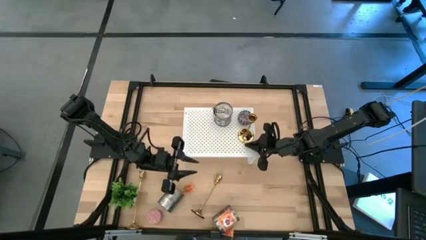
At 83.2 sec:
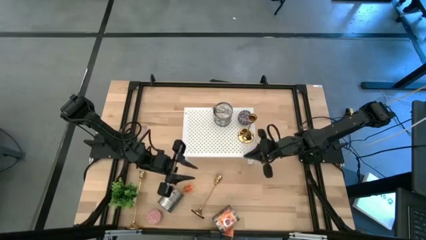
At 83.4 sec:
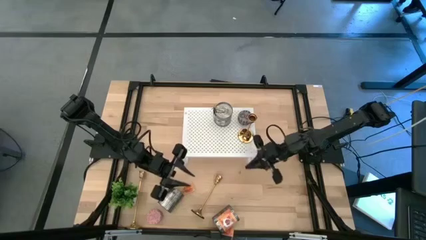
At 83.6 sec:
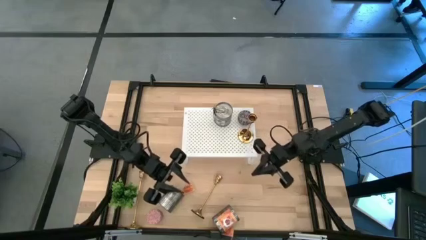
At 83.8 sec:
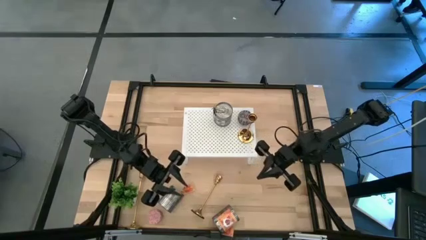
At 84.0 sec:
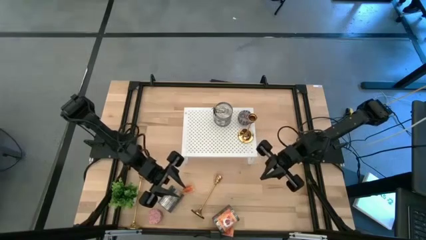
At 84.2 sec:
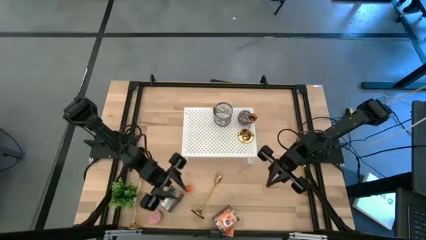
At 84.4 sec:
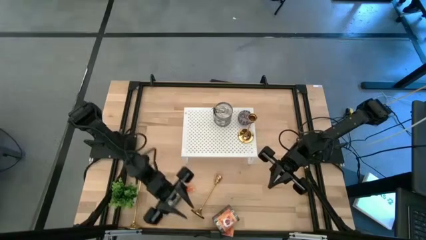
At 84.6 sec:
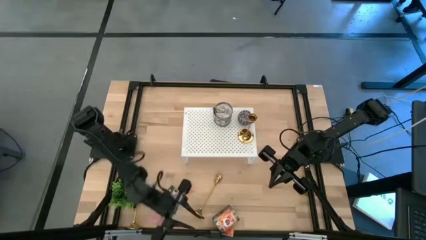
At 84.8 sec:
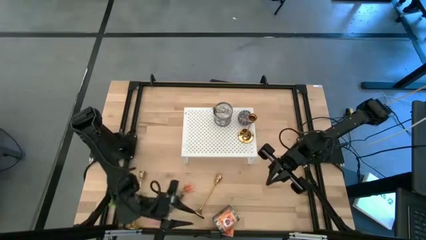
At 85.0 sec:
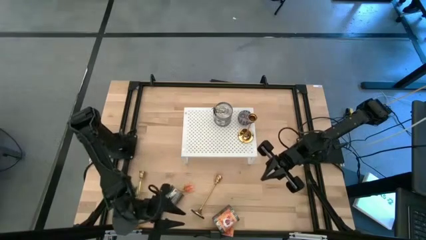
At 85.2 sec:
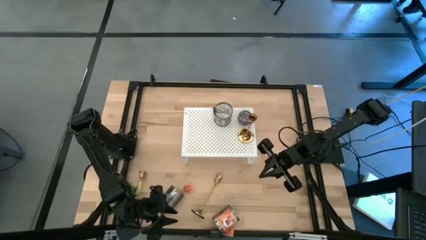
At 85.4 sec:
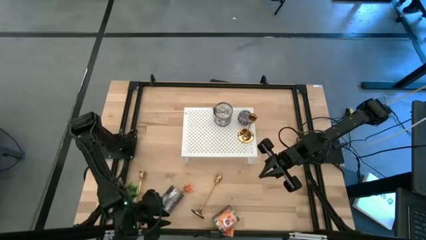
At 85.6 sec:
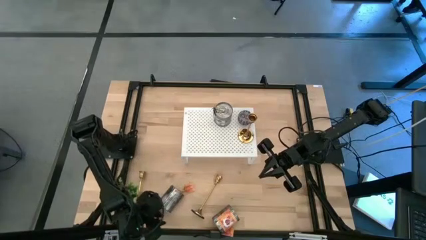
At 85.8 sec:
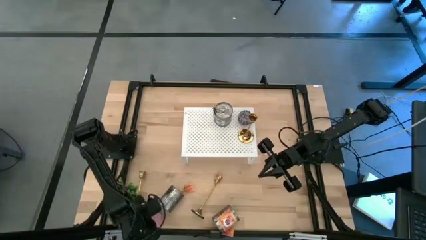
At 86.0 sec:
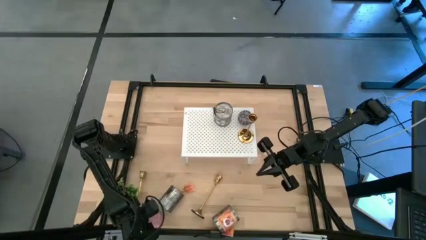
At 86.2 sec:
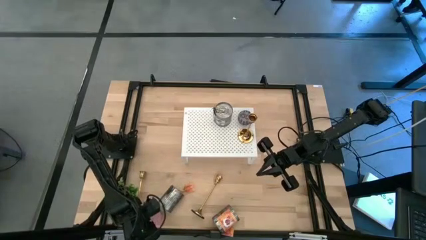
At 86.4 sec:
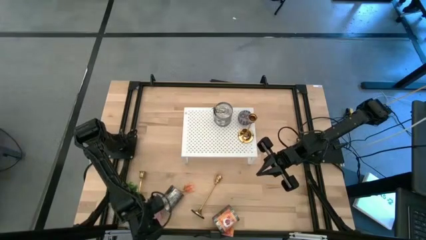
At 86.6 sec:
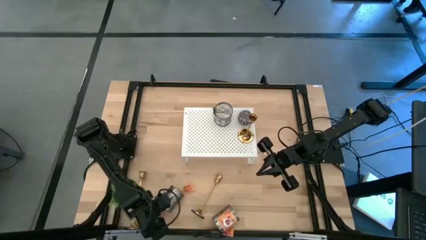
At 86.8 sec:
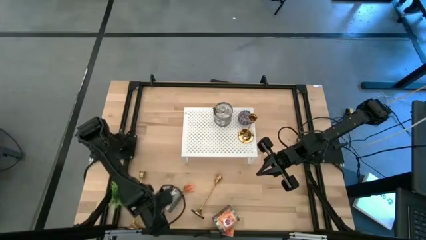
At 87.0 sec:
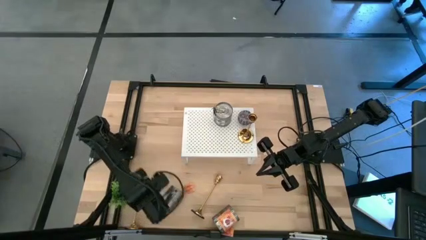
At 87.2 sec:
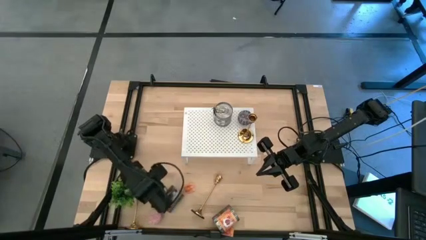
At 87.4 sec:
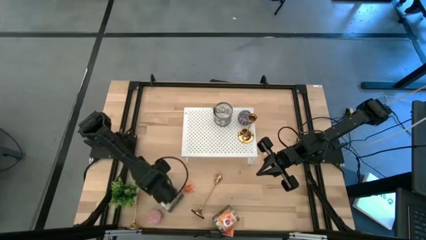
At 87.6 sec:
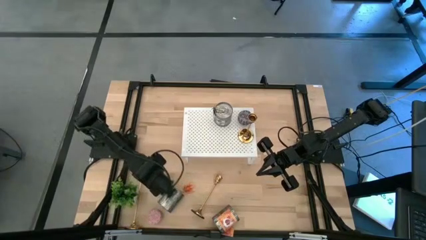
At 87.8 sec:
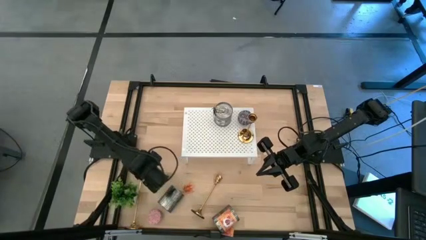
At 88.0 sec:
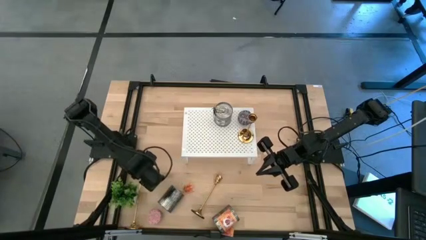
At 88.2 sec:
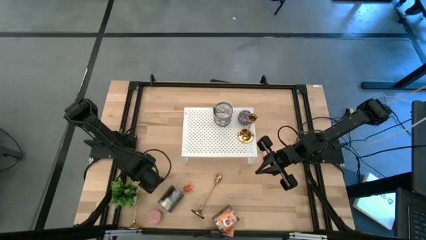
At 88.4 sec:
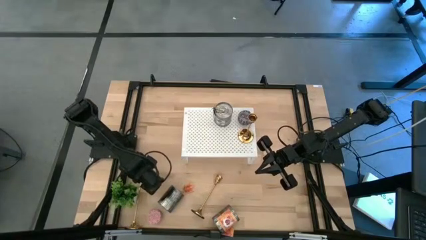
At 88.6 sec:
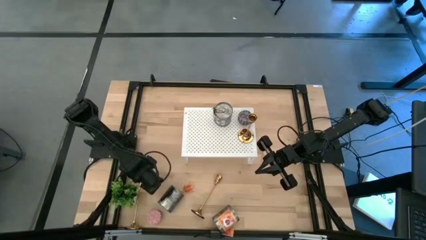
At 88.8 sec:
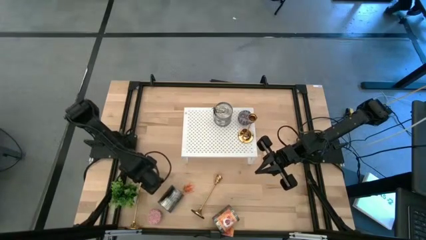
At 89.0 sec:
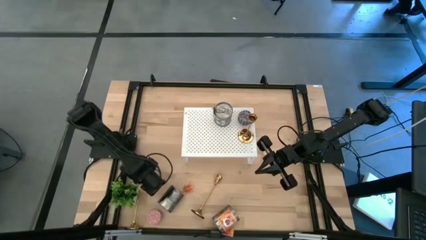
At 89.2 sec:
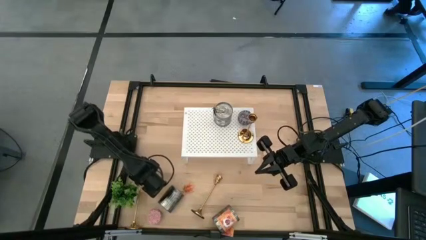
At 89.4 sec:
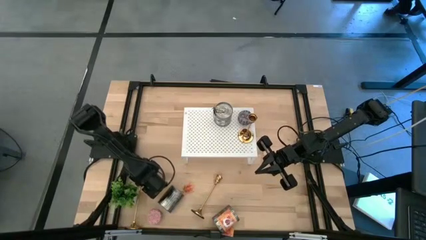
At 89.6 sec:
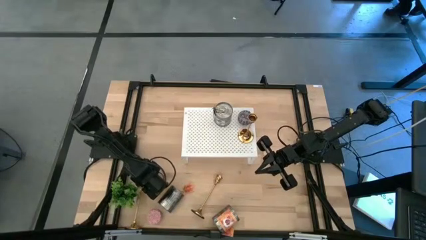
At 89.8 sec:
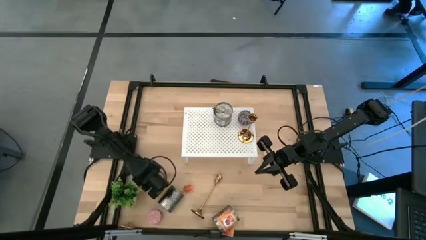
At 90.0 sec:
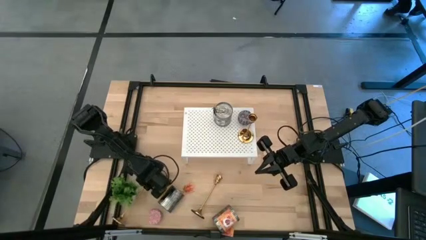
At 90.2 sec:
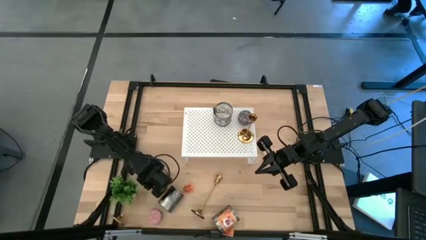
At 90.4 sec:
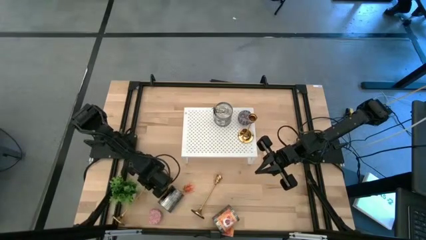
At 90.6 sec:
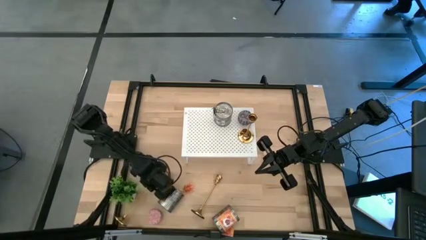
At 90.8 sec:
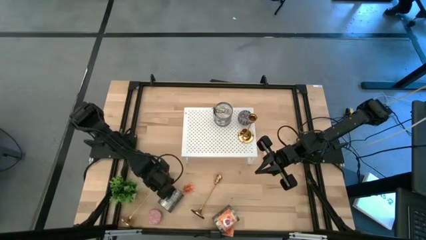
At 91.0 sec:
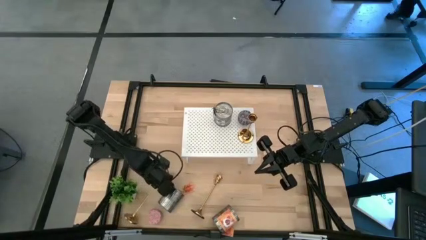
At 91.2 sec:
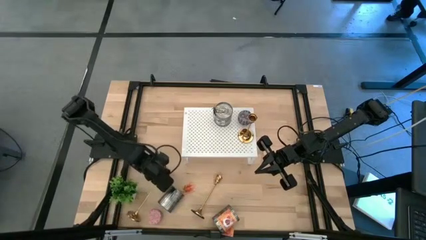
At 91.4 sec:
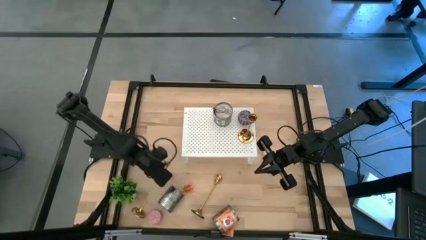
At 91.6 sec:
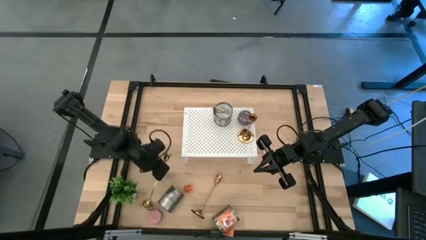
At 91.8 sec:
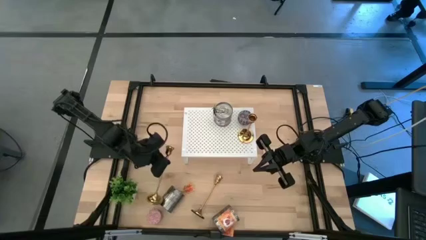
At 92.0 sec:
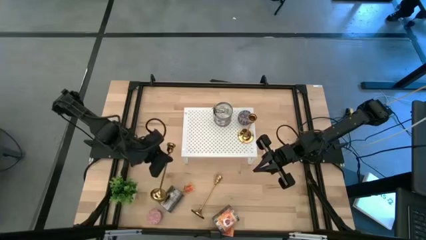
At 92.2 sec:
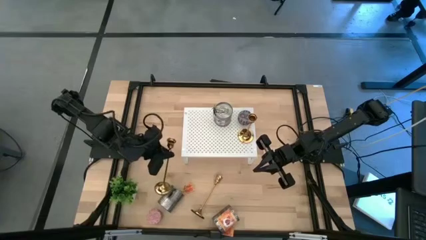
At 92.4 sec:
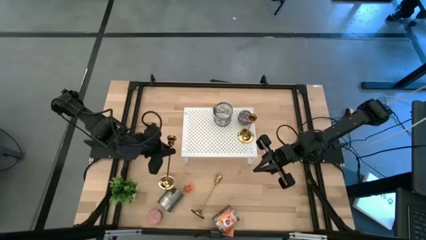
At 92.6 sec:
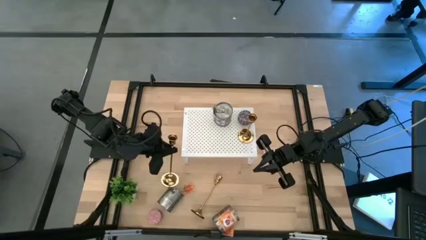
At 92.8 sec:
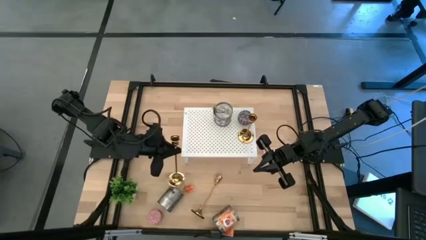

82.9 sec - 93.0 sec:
Task: Pick & Place candle stick holders
Put the left gold candle holder on the shelf
